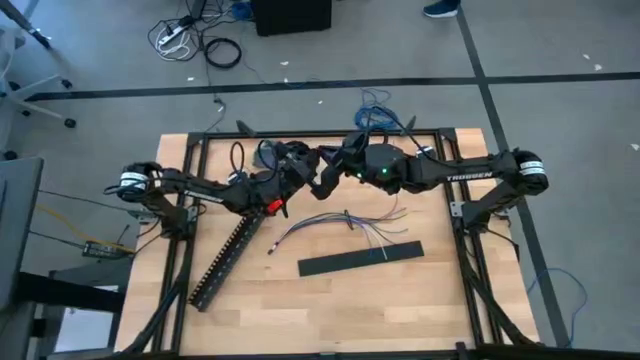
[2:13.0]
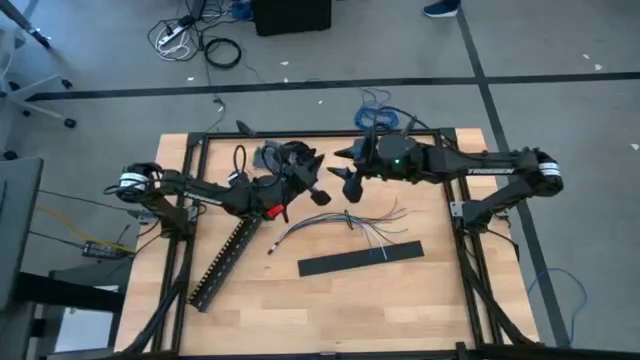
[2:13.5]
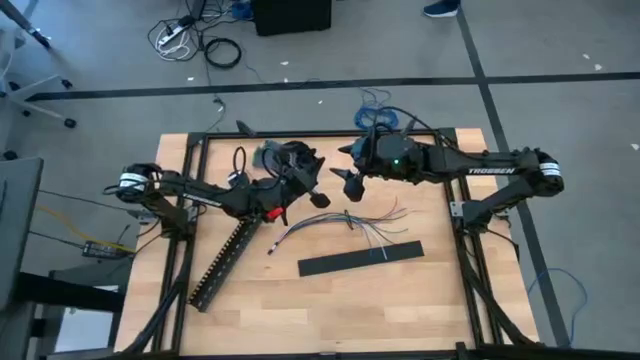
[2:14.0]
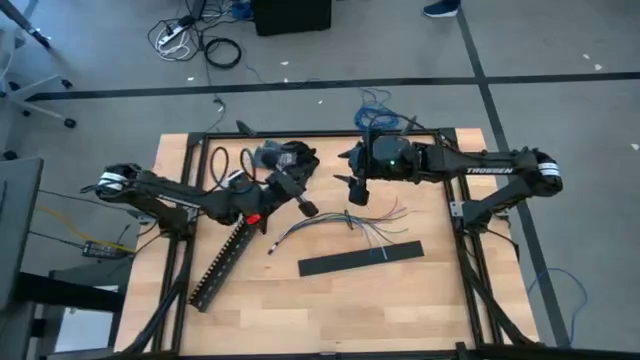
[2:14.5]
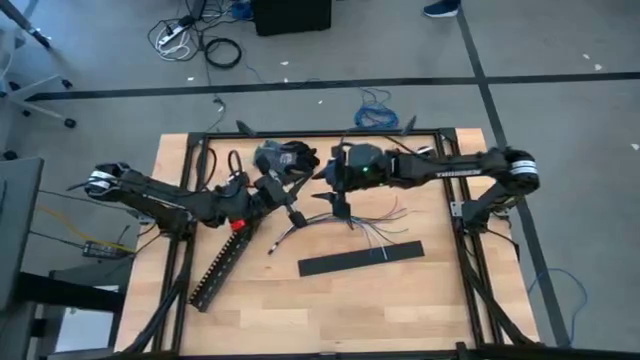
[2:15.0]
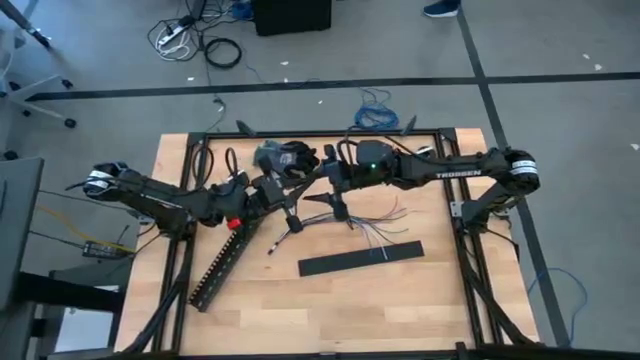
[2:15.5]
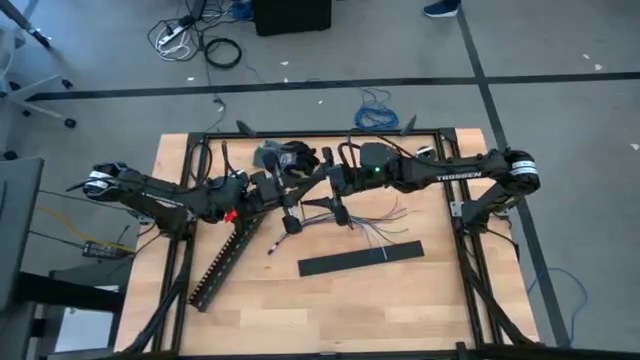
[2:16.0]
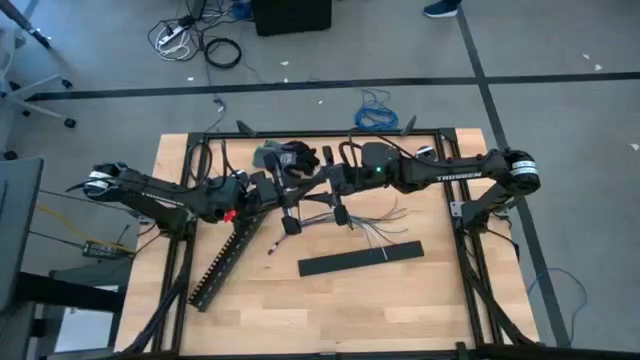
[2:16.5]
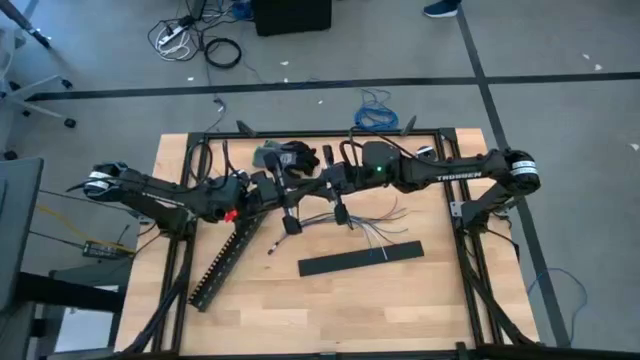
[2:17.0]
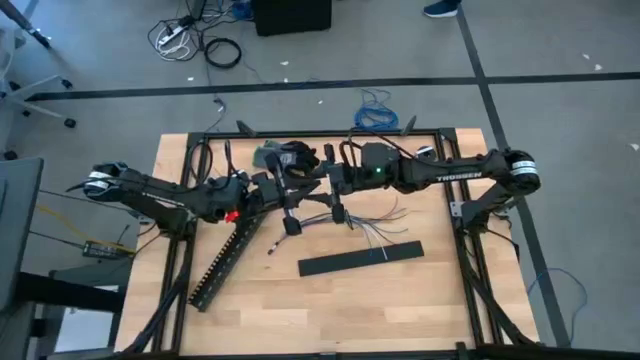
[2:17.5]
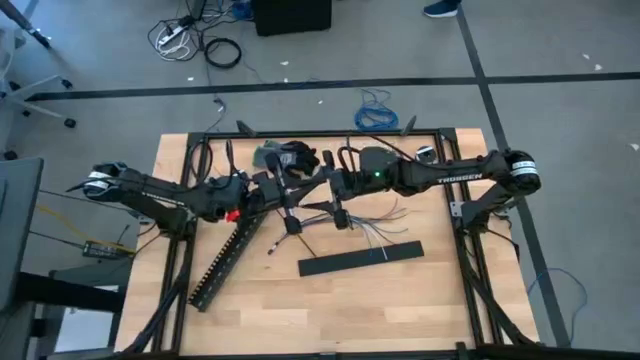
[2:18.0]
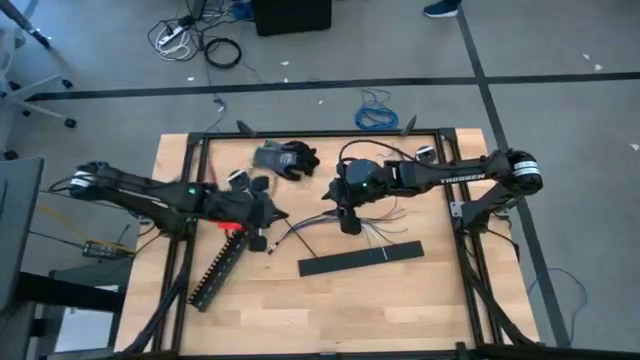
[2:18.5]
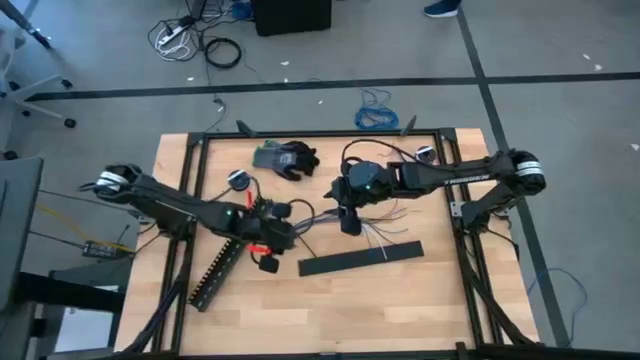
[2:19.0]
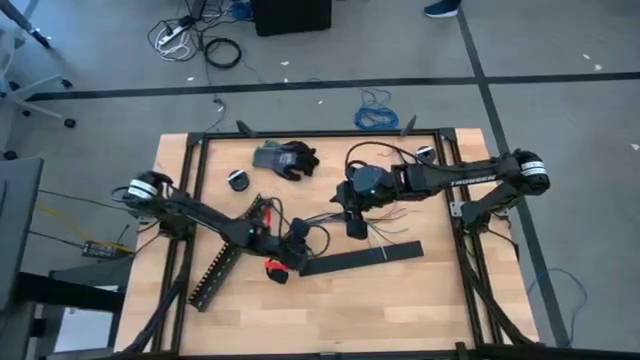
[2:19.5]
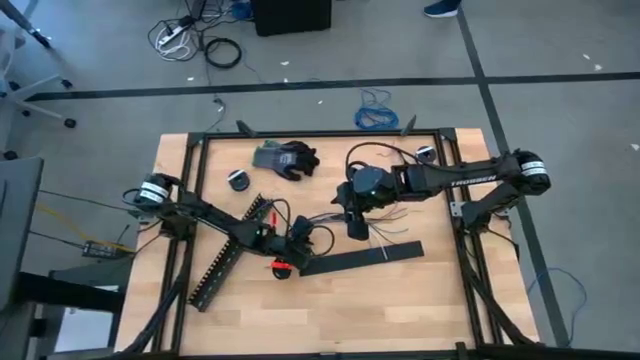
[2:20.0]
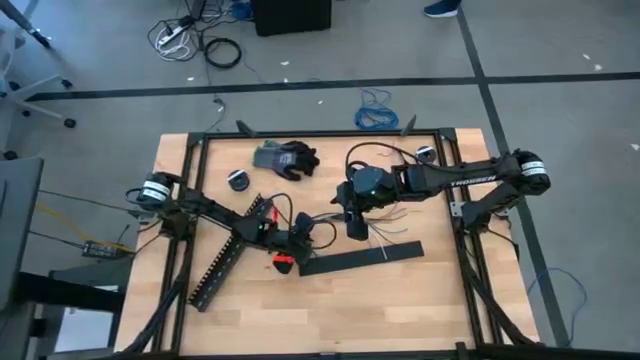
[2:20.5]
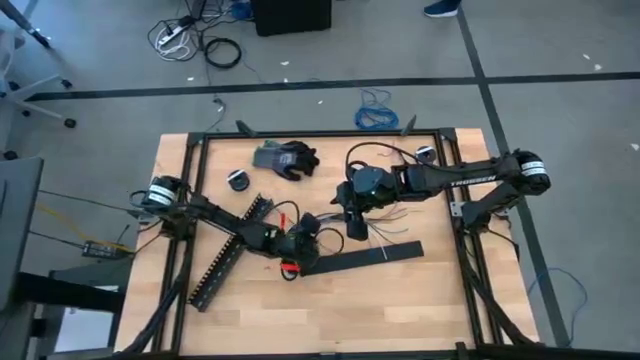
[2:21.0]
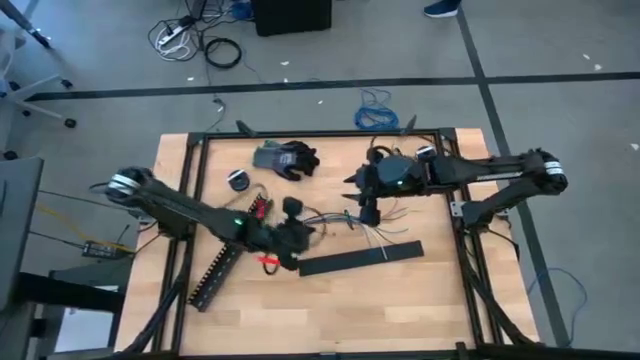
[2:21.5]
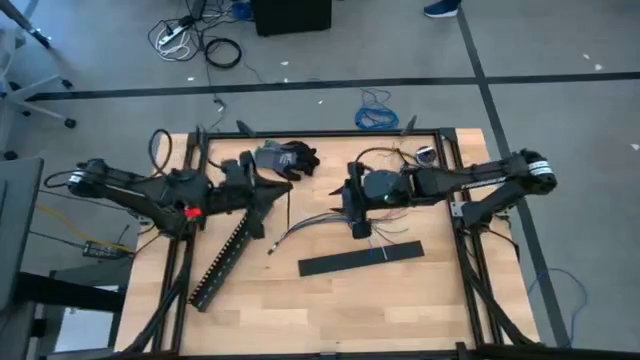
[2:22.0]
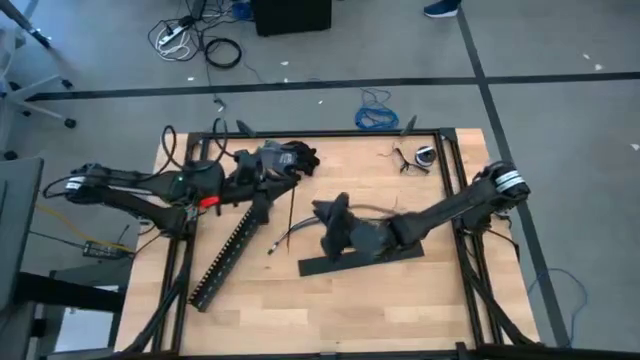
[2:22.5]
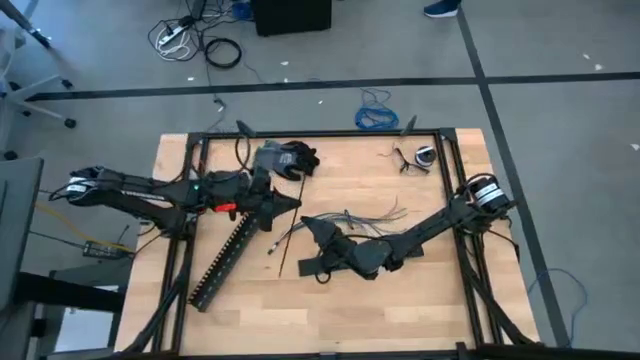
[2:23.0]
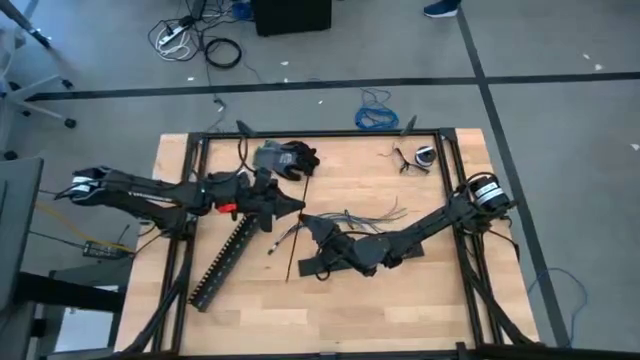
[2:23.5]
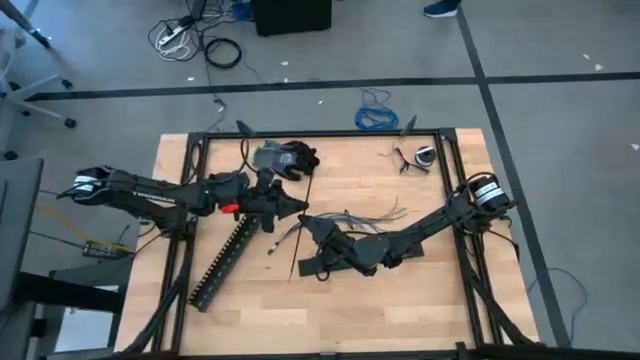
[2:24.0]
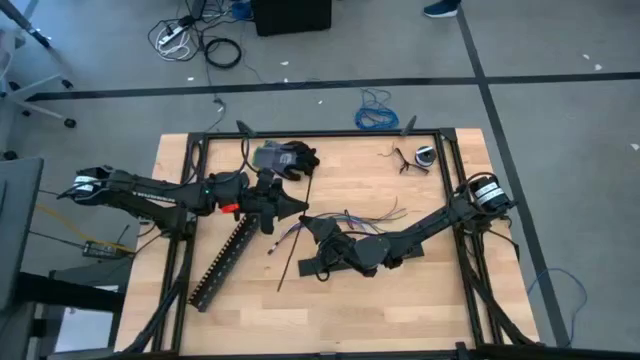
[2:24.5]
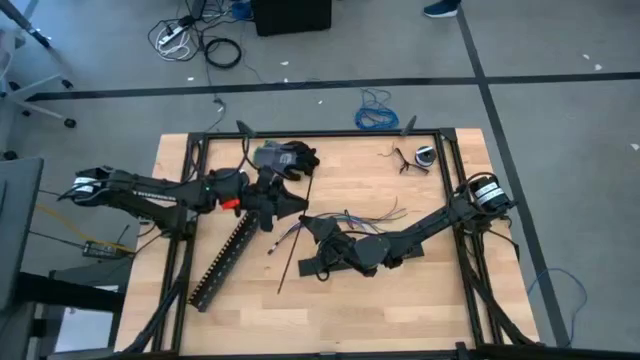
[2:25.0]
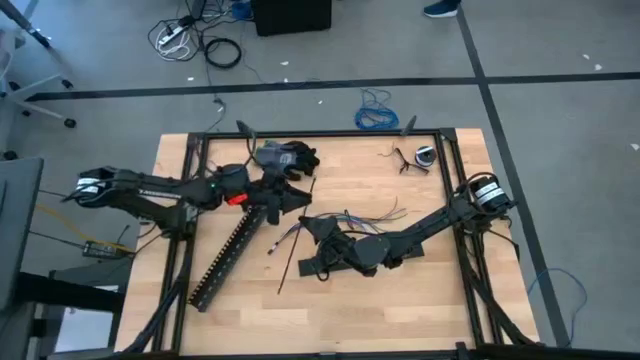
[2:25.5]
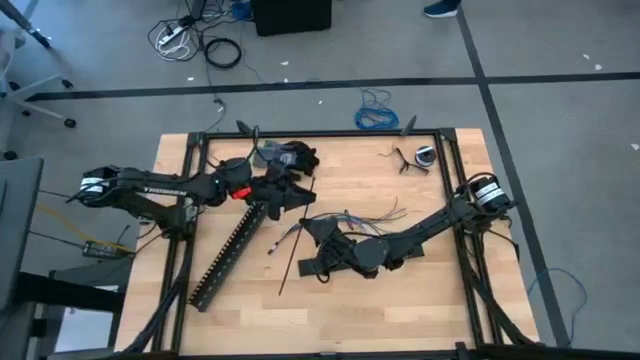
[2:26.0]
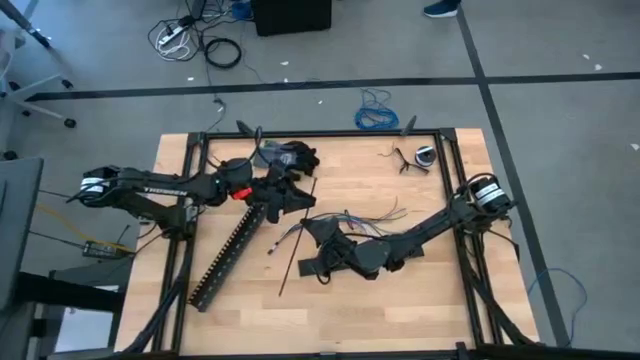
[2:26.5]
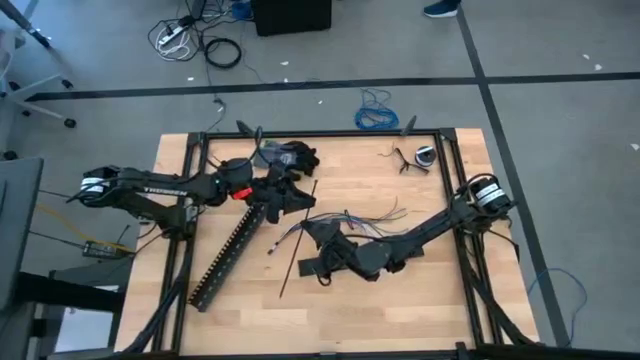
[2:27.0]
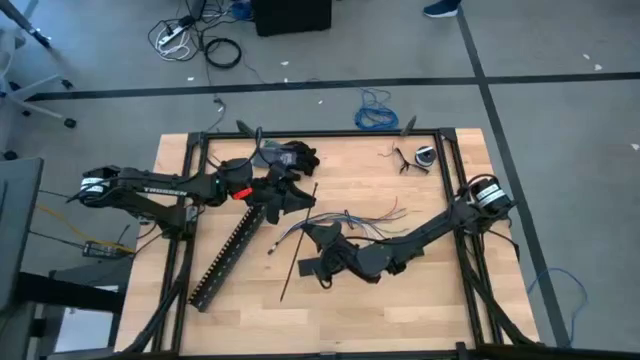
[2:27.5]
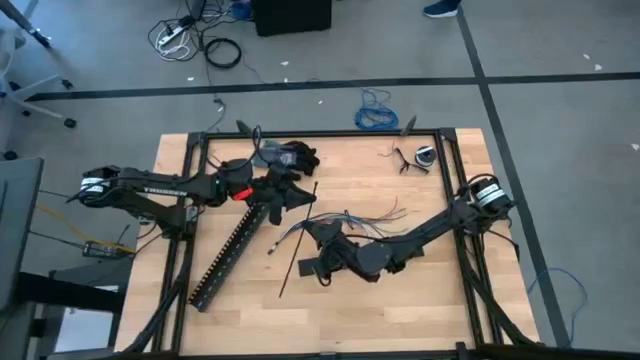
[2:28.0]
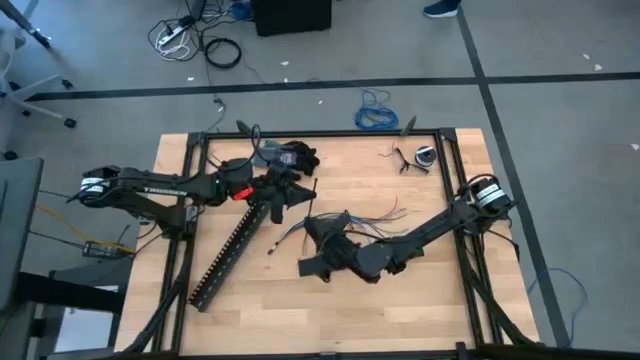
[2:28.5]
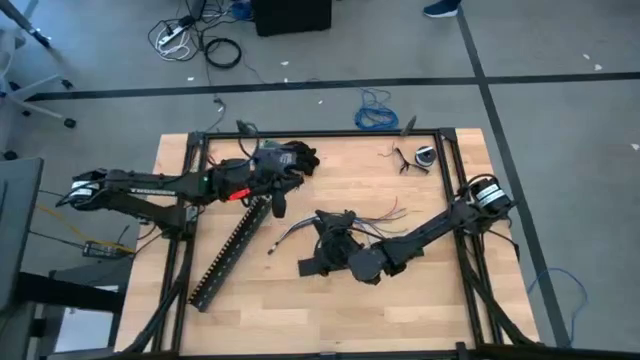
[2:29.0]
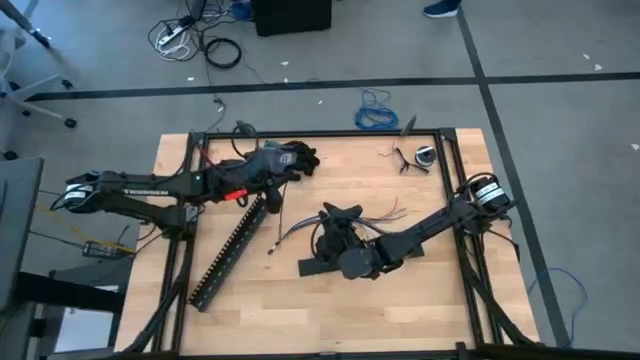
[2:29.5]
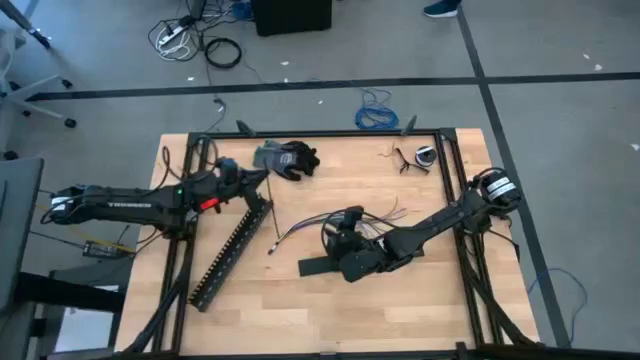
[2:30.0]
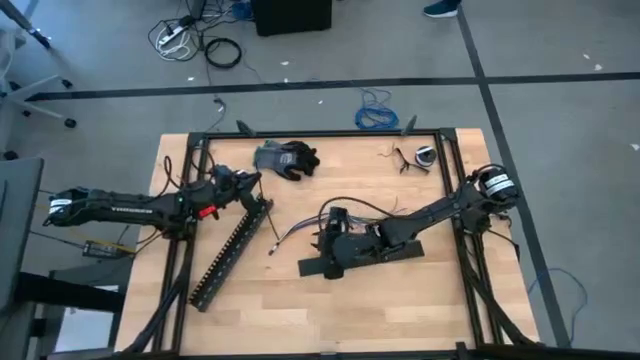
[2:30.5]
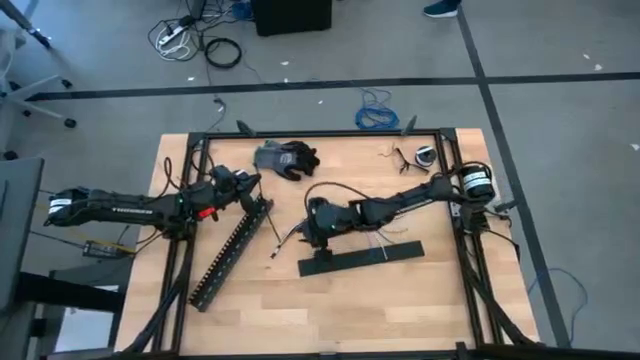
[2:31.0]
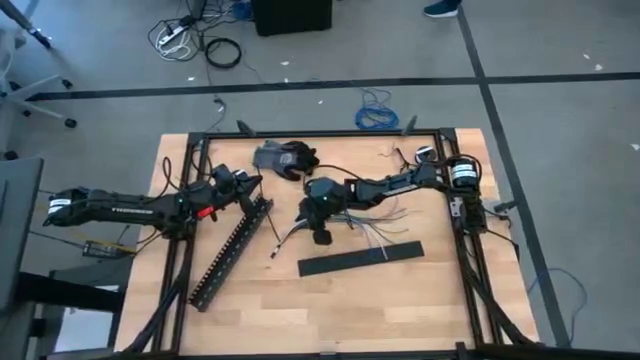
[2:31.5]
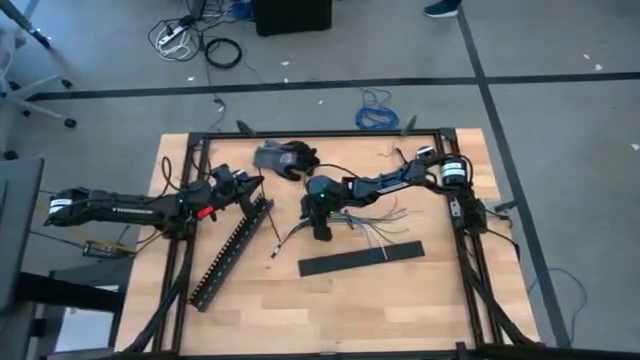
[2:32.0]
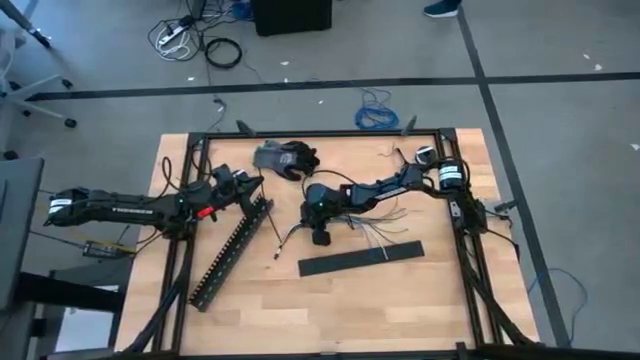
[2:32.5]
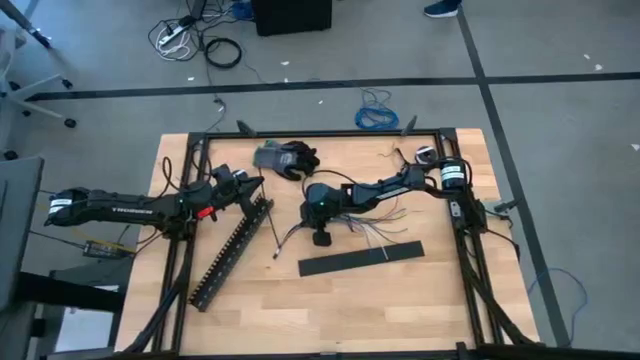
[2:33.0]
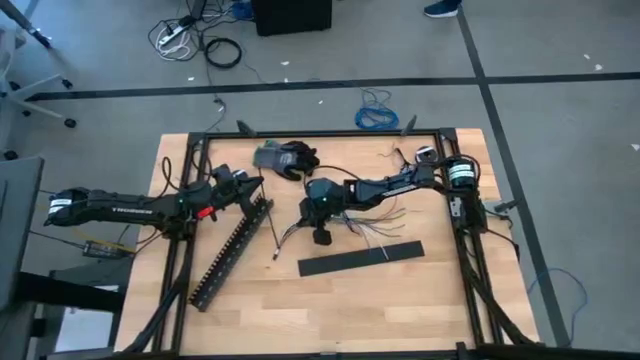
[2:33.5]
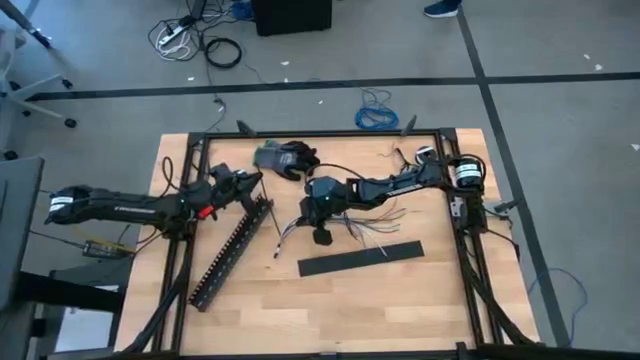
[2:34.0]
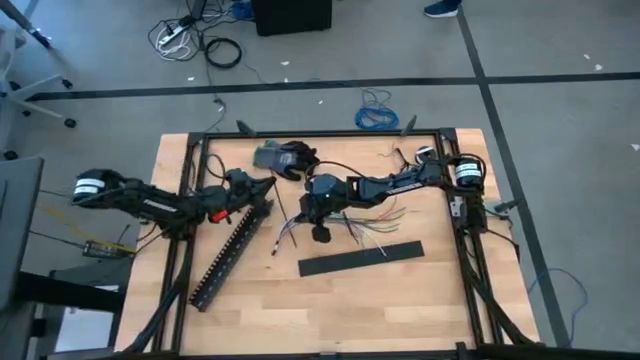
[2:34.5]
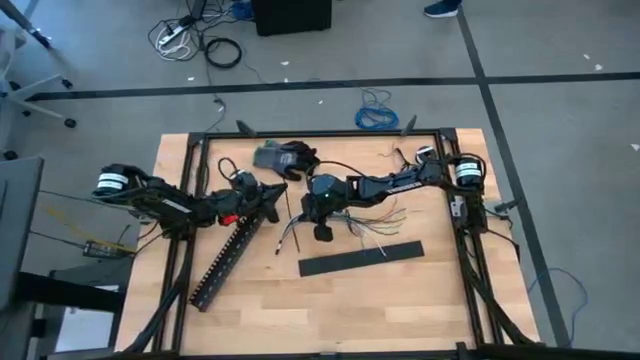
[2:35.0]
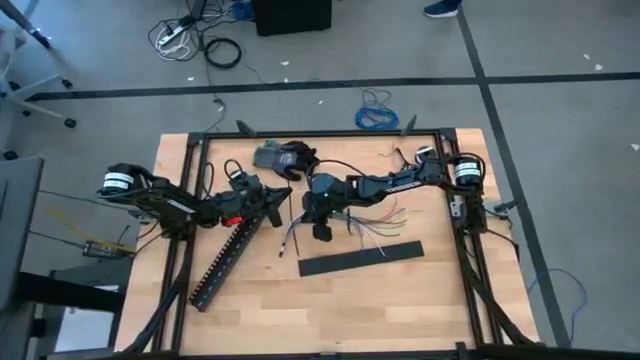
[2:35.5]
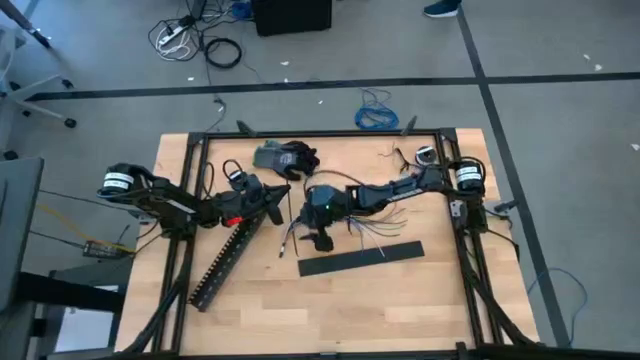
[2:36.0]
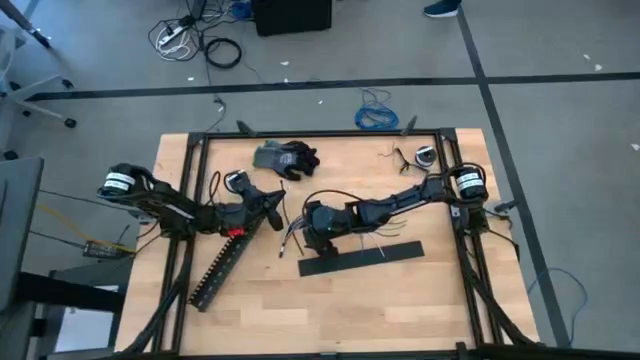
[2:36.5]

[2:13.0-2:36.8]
Task: Ziptie cables
Wrap the other black zip tie on the cable wires
